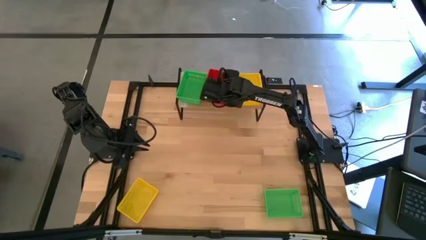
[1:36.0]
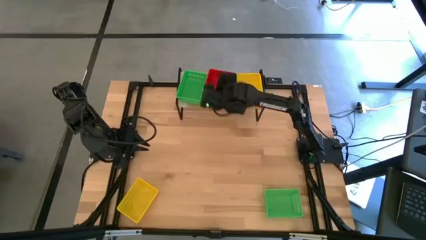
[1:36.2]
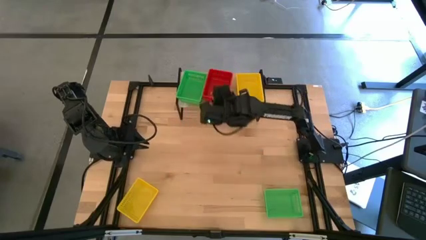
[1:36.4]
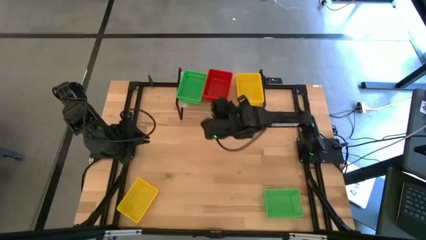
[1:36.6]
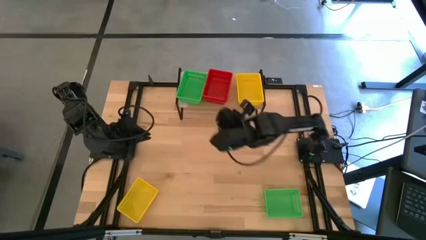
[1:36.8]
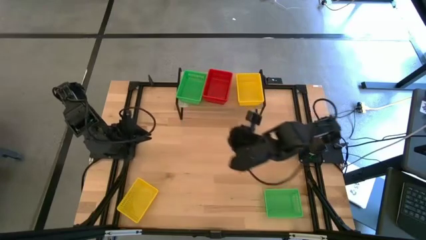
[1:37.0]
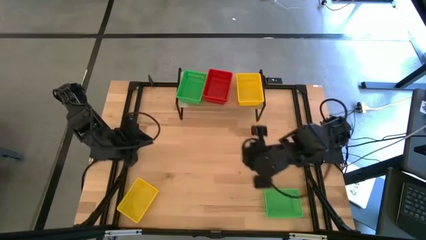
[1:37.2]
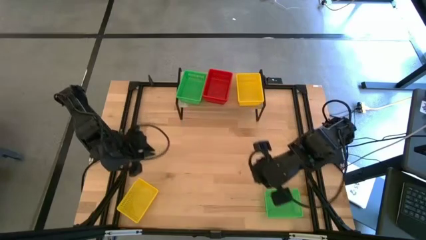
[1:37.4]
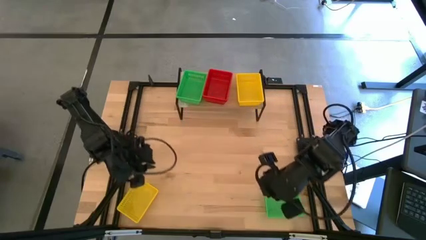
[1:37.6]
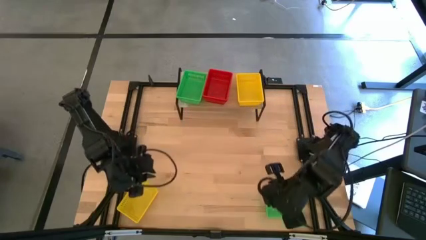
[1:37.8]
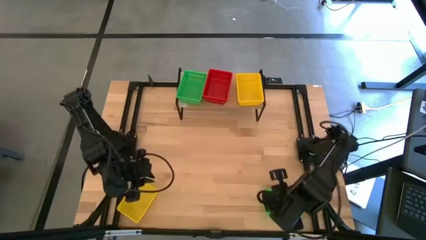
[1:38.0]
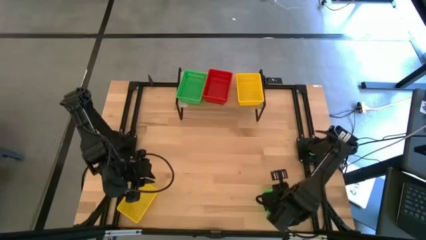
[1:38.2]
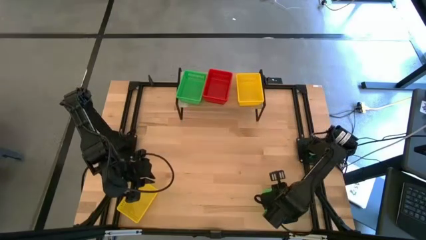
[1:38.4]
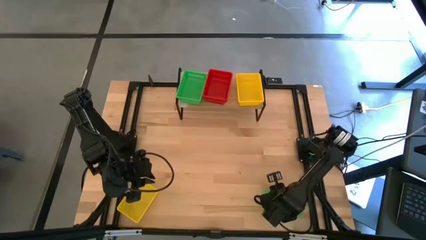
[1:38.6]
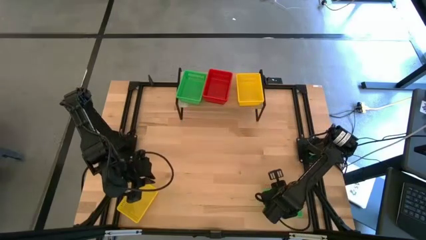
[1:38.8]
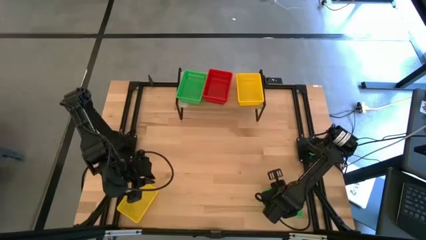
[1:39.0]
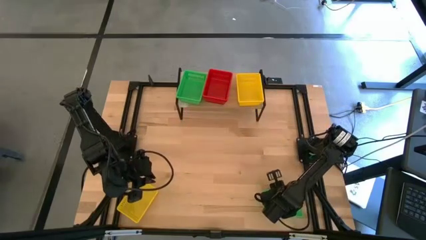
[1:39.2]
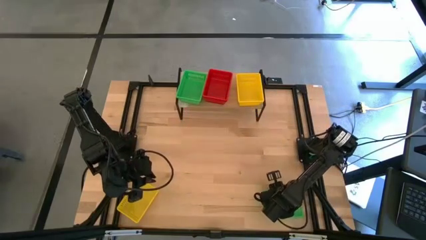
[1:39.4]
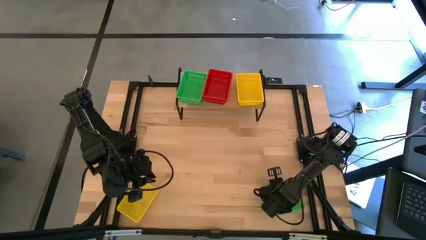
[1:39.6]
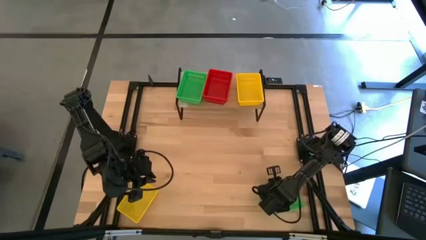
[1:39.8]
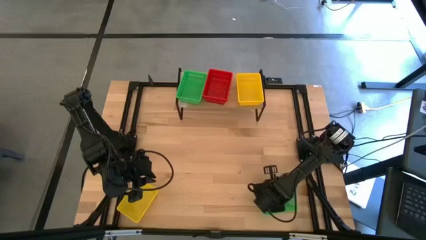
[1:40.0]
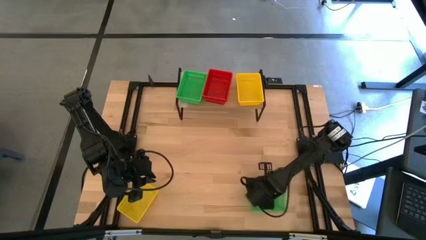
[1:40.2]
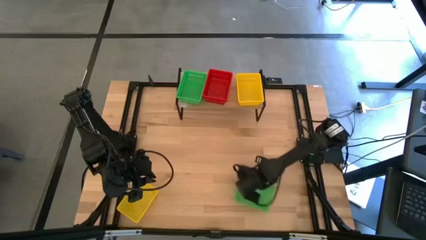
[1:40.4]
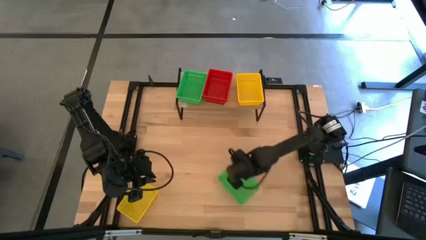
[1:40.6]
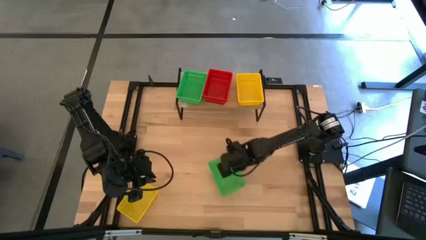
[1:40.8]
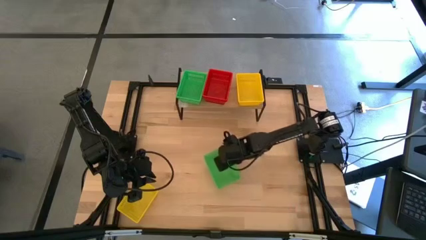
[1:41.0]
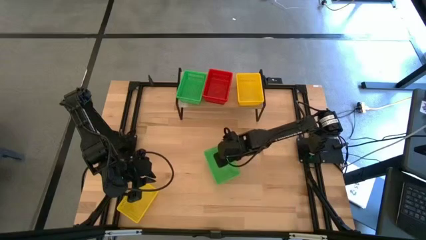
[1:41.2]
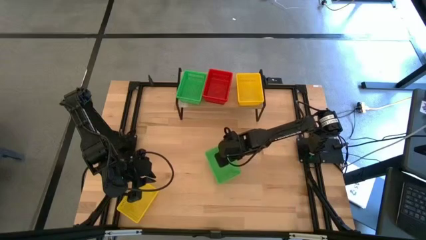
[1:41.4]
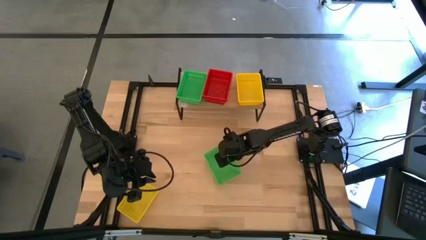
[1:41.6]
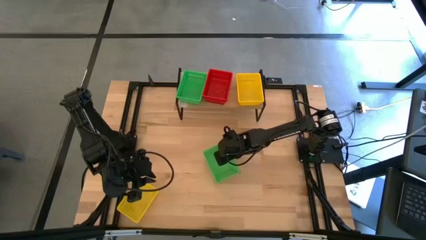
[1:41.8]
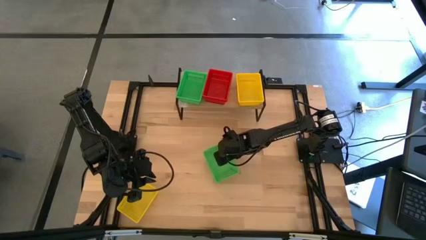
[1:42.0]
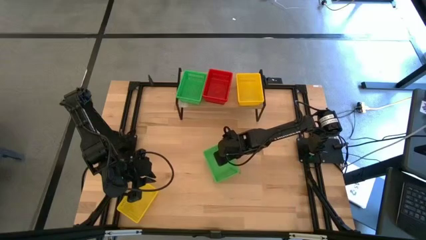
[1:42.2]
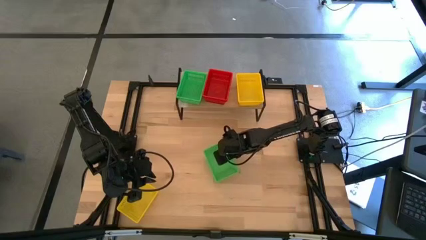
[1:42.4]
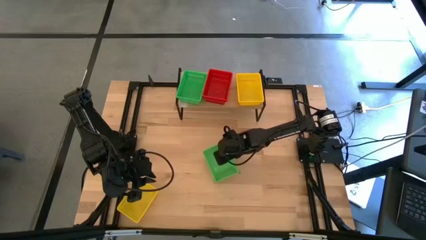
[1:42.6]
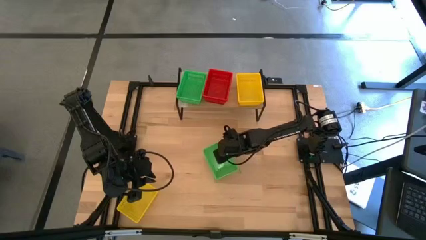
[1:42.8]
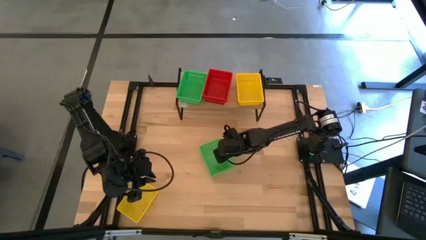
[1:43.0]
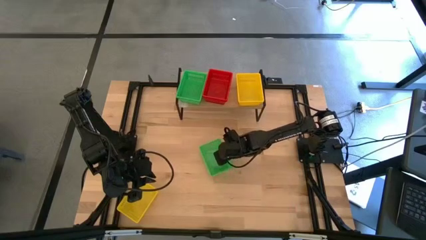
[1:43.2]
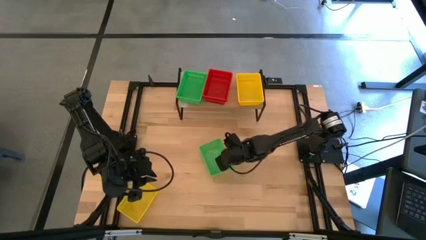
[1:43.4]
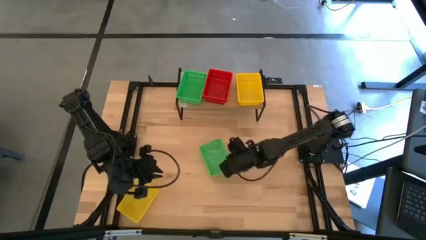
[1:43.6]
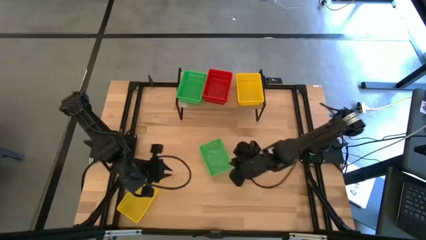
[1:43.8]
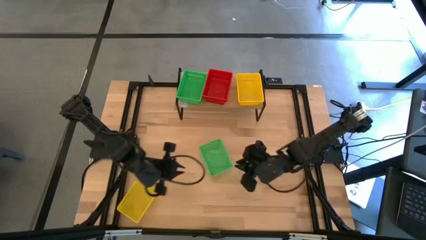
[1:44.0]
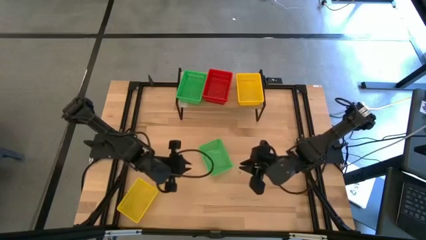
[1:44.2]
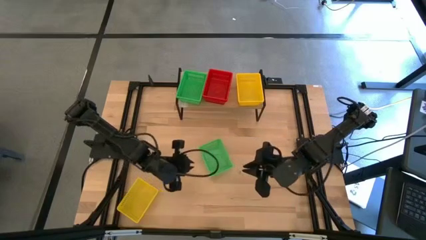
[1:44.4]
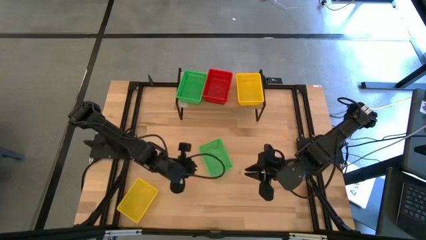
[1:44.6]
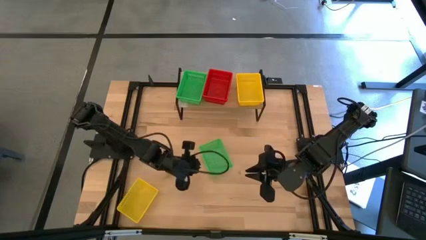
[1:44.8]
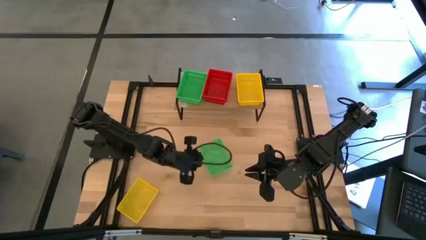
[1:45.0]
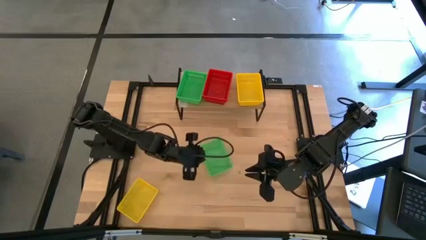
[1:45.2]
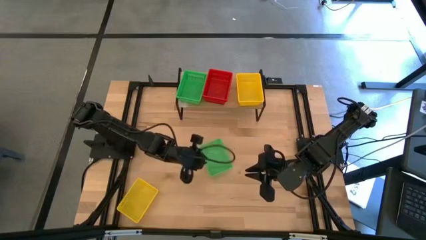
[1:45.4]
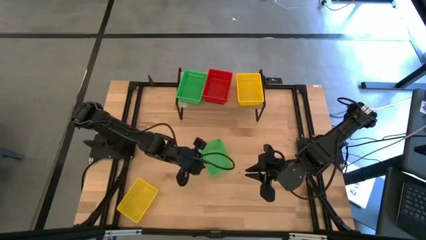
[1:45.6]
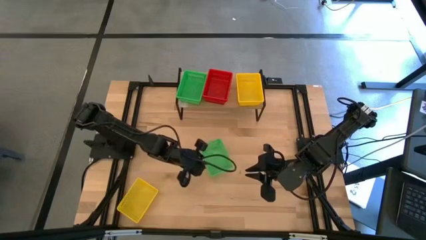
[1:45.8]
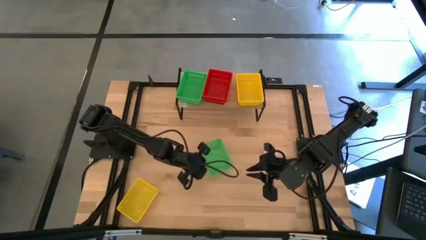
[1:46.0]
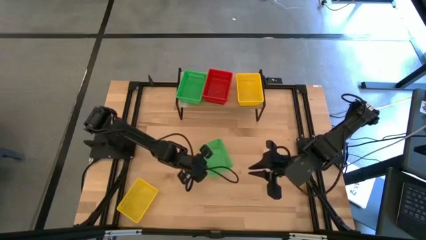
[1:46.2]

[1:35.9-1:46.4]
Task: Stack baskets on shelf by color
Stack the green bin on top of the green bins on the shelf

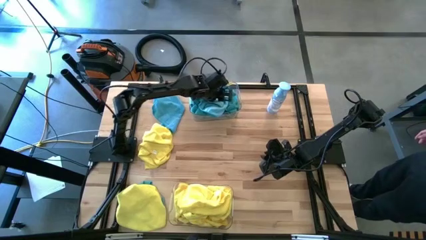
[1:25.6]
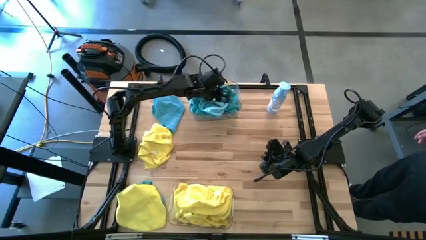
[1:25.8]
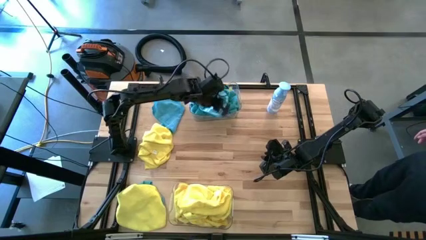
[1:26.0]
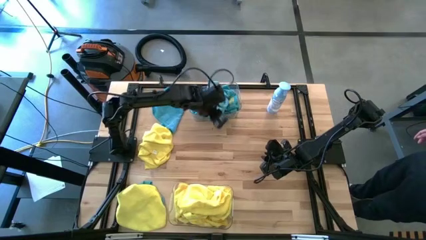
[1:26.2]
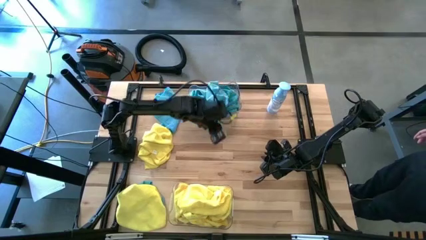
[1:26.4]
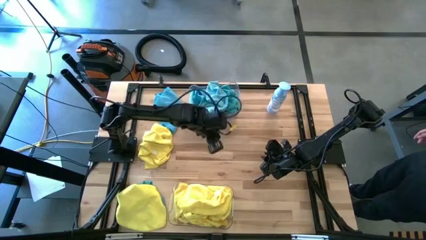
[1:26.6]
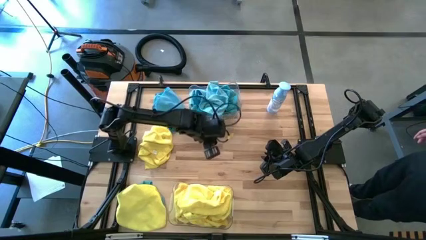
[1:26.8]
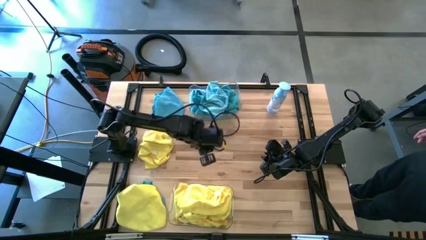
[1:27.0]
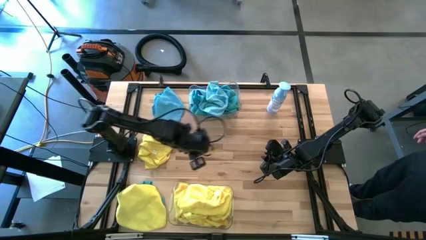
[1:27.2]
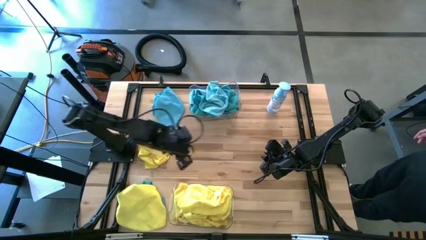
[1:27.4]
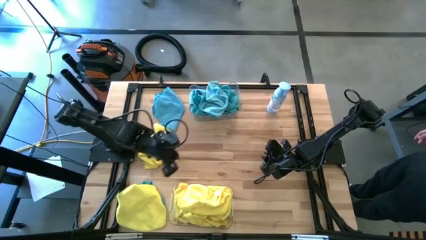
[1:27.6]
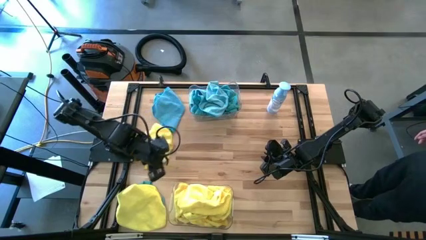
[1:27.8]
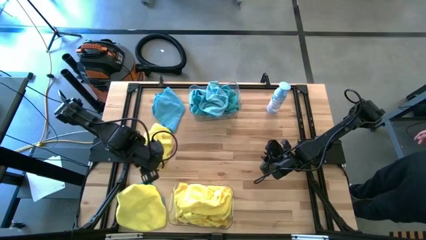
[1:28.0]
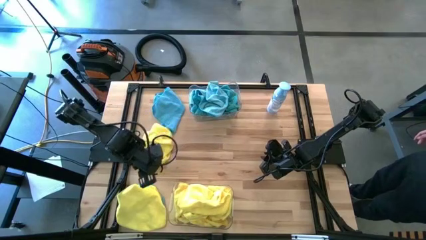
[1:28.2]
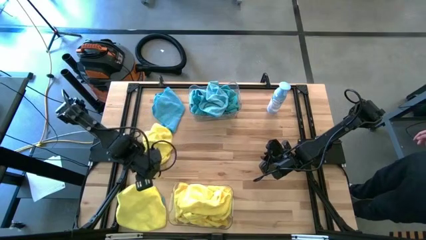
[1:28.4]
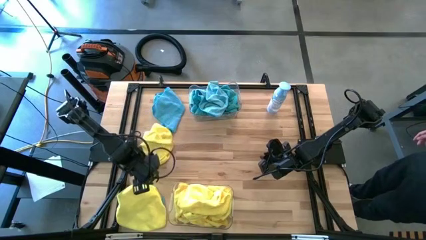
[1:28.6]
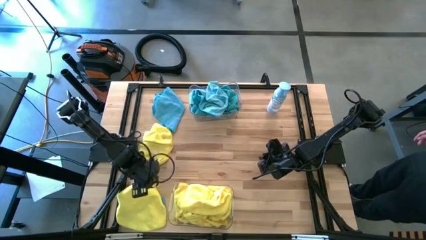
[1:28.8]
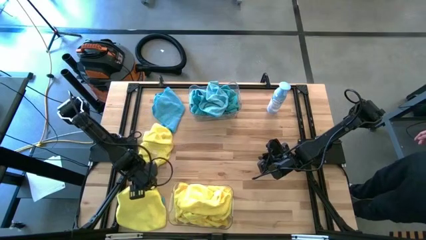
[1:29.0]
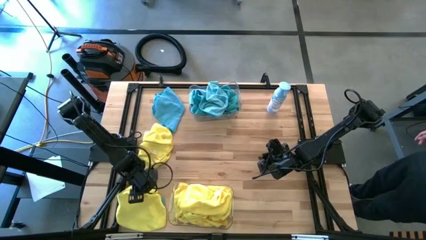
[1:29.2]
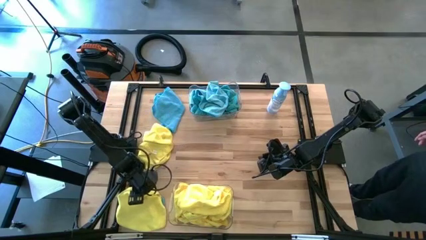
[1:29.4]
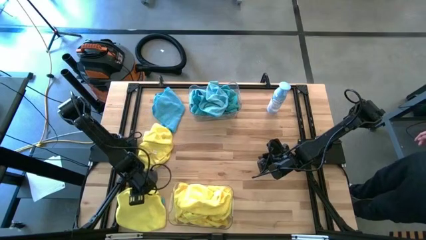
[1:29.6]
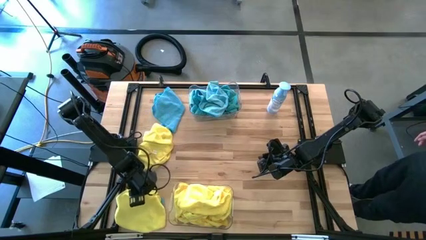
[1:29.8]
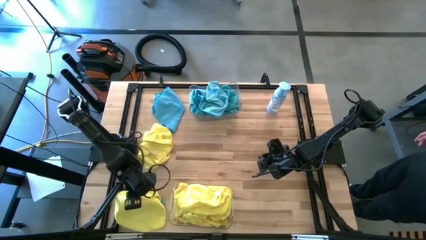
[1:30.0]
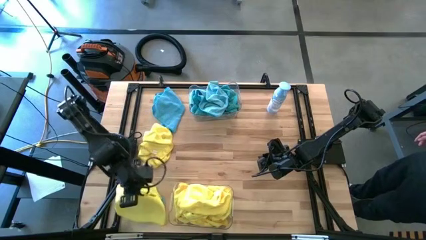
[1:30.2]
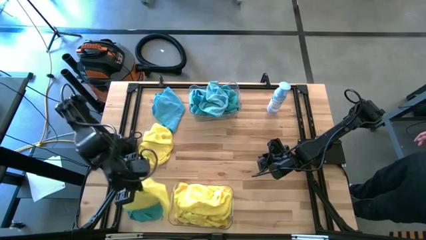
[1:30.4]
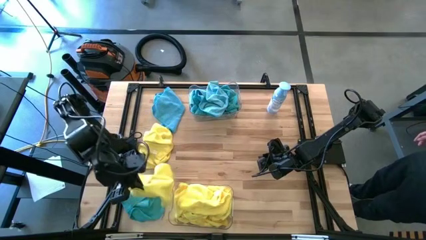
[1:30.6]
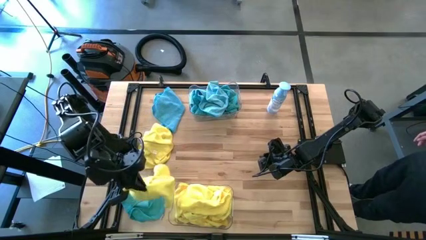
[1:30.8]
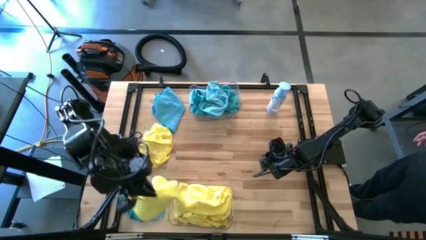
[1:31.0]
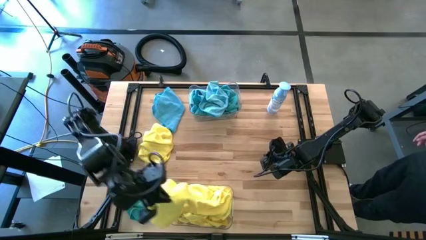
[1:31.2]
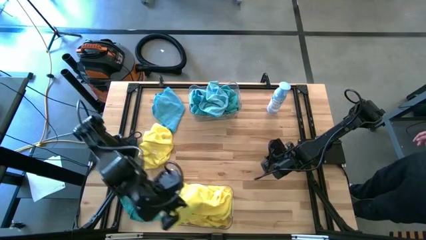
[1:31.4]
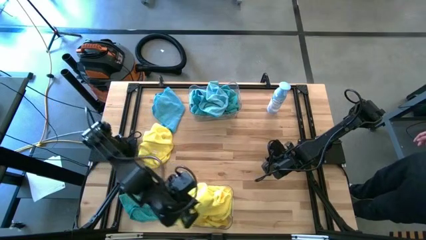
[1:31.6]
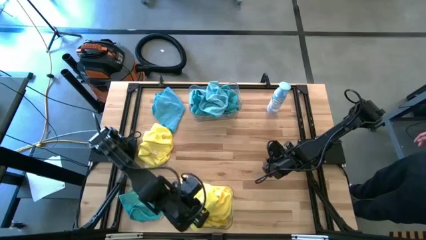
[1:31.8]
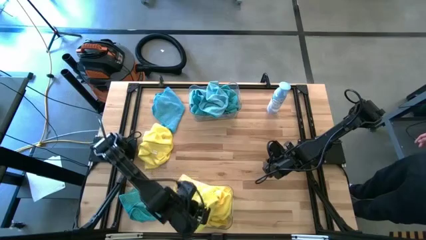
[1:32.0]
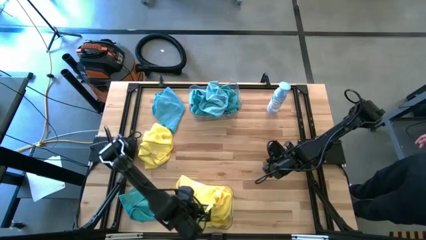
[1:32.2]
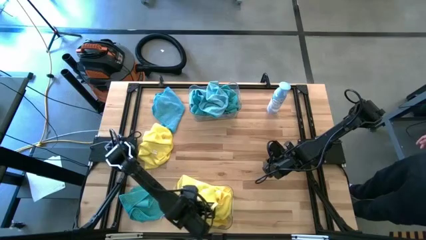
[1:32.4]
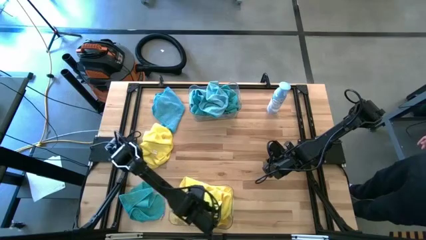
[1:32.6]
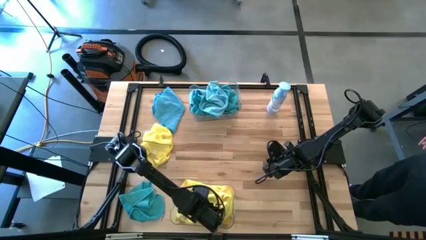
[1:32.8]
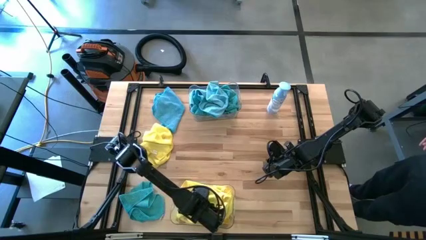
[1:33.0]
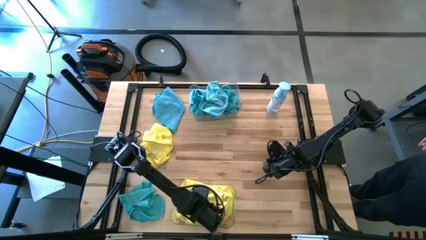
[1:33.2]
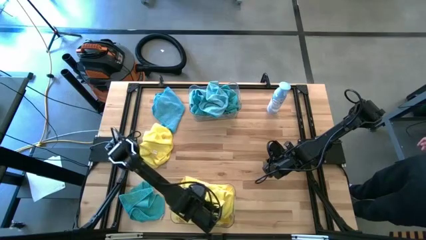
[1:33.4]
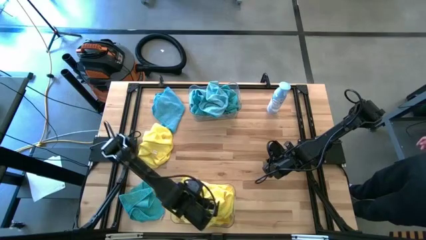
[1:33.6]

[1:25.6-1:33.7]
Task: Sort microfiber towel by color & place in baskets
Put the yellow microfiber towel into the bottom transparent bin
